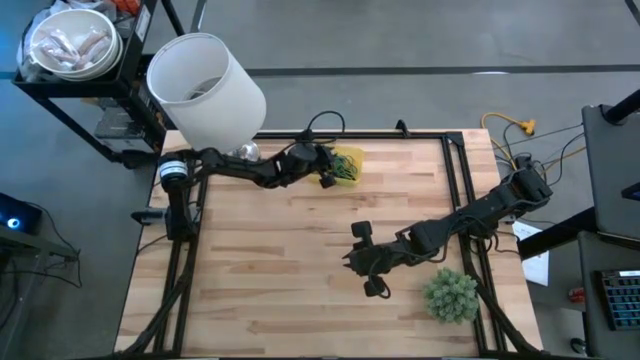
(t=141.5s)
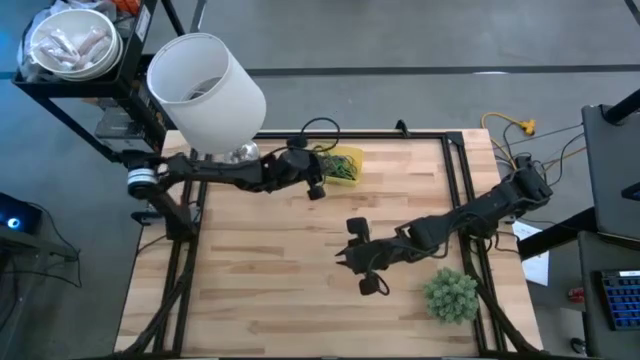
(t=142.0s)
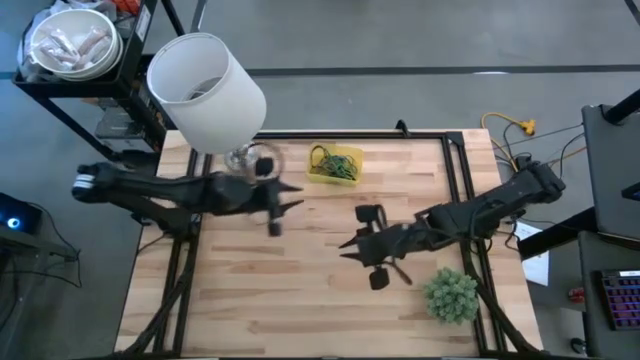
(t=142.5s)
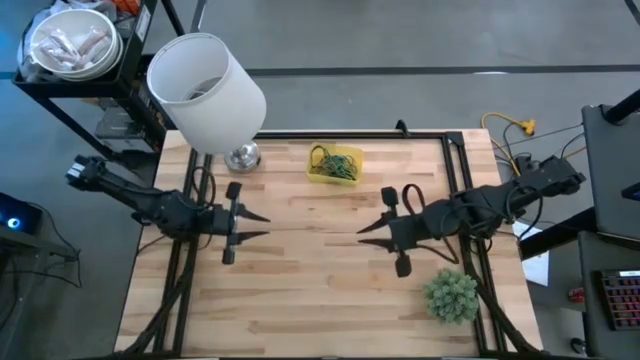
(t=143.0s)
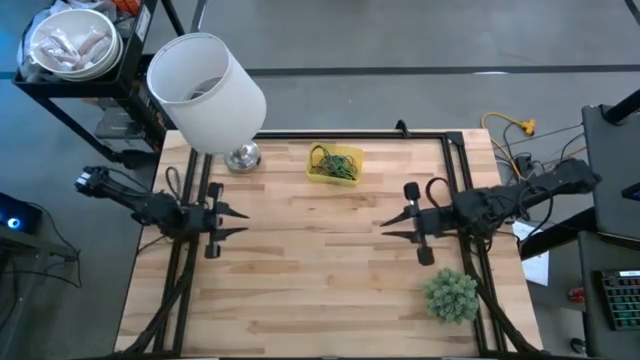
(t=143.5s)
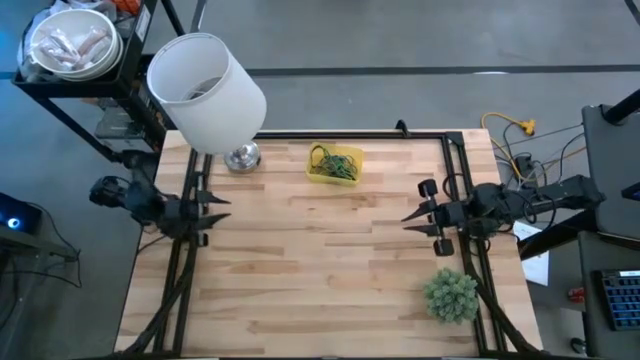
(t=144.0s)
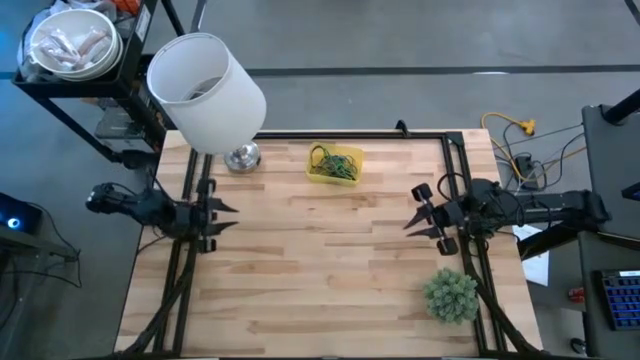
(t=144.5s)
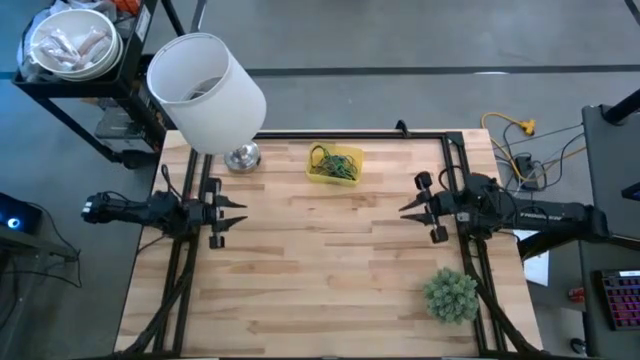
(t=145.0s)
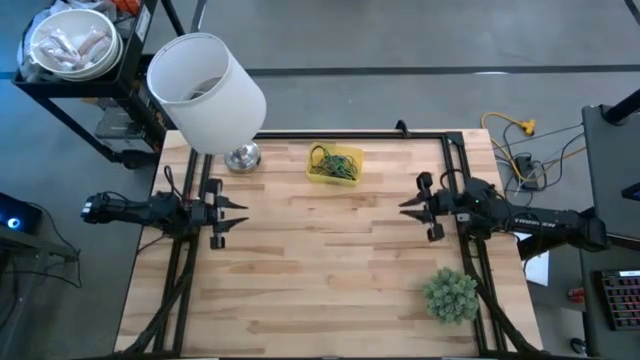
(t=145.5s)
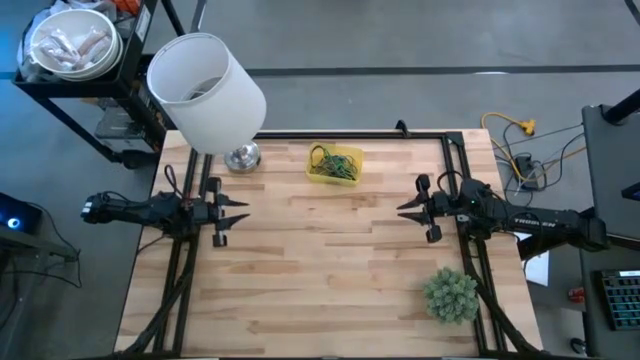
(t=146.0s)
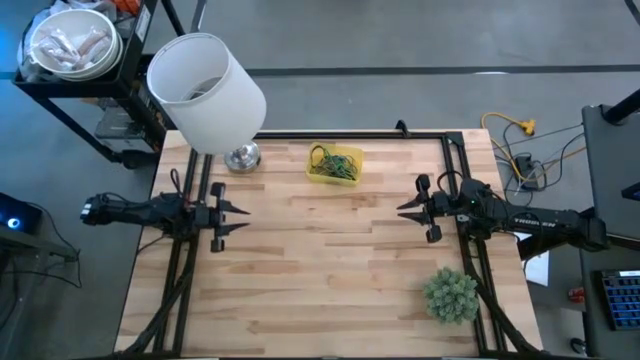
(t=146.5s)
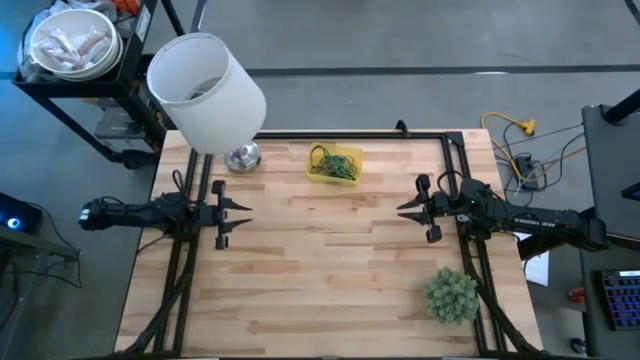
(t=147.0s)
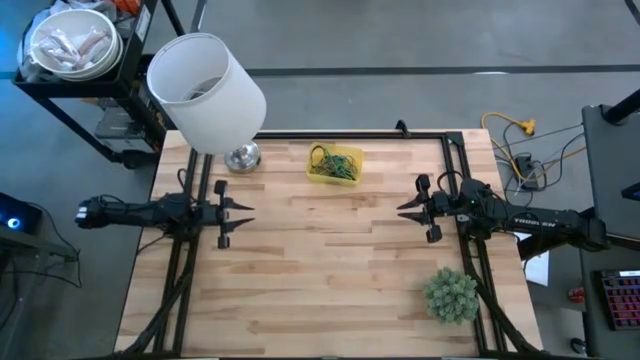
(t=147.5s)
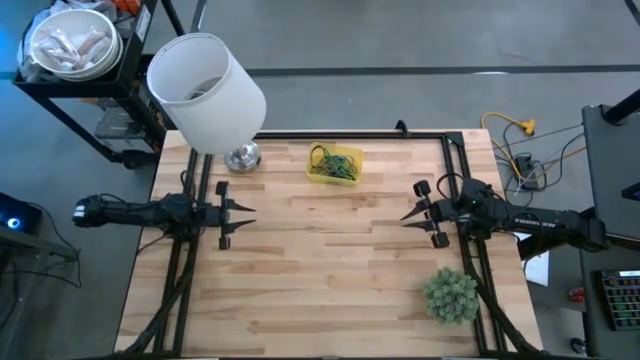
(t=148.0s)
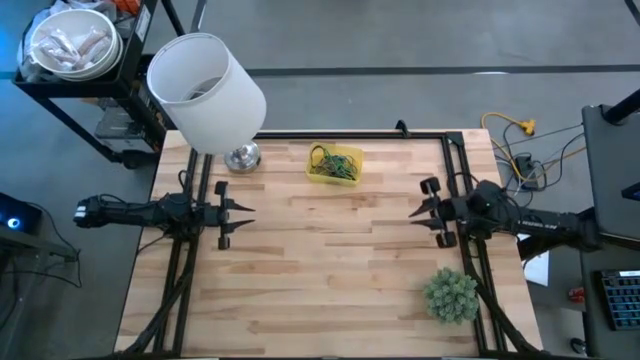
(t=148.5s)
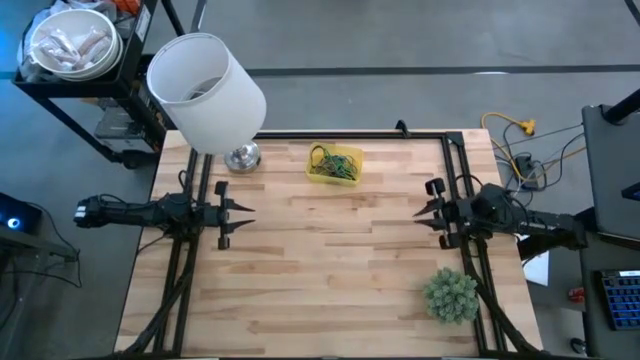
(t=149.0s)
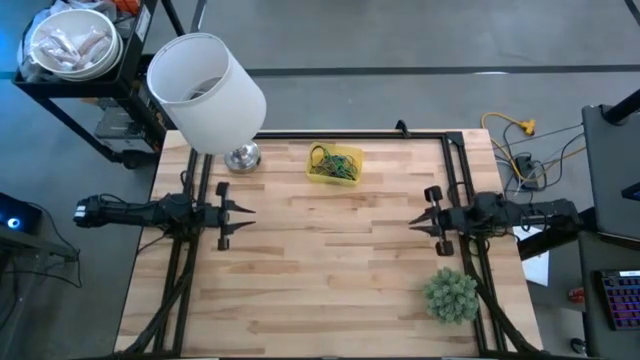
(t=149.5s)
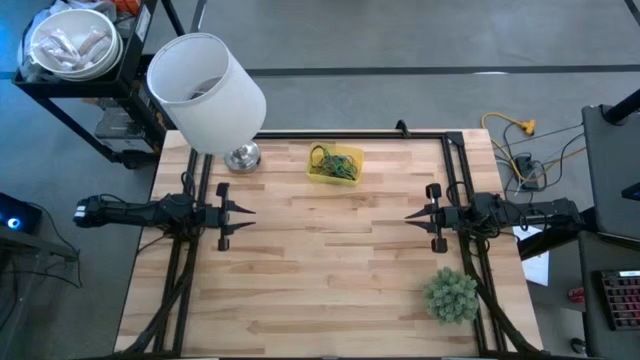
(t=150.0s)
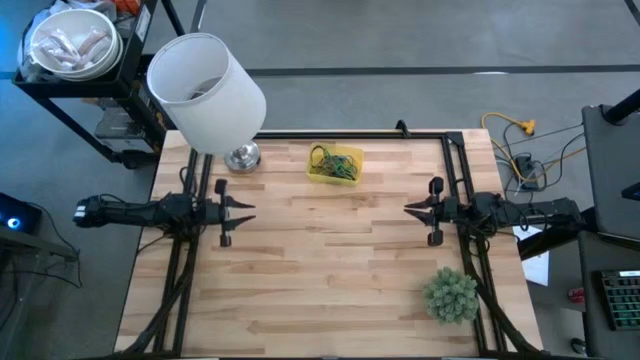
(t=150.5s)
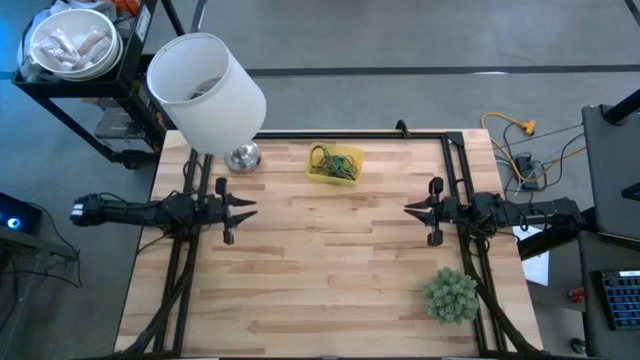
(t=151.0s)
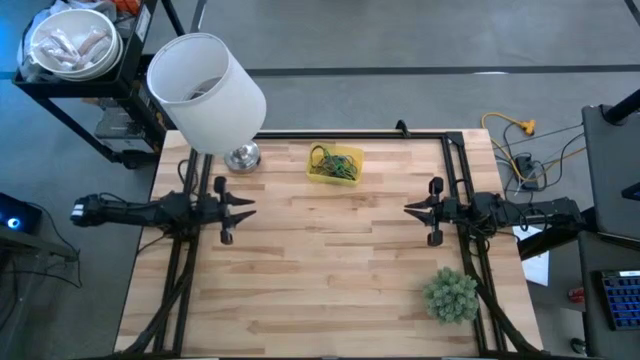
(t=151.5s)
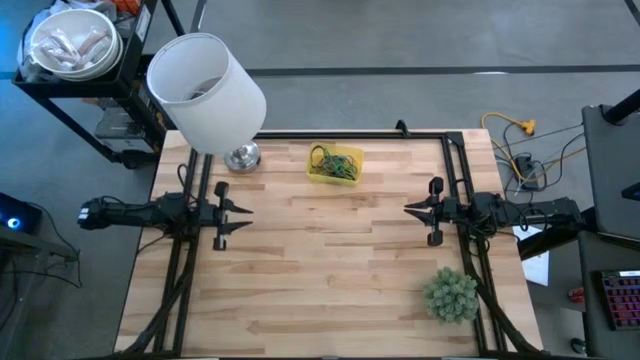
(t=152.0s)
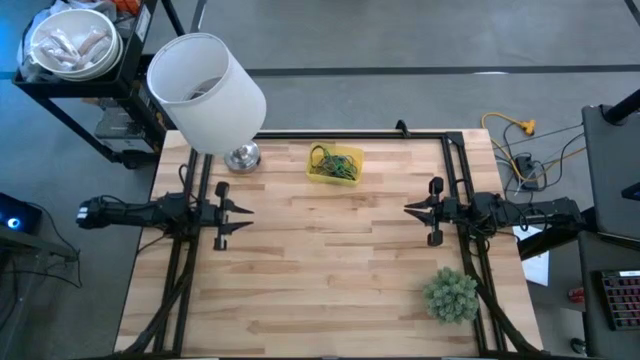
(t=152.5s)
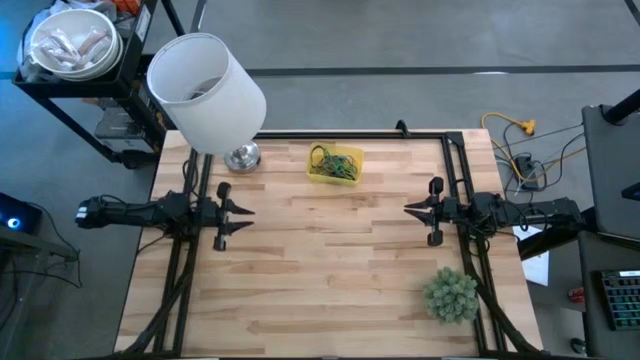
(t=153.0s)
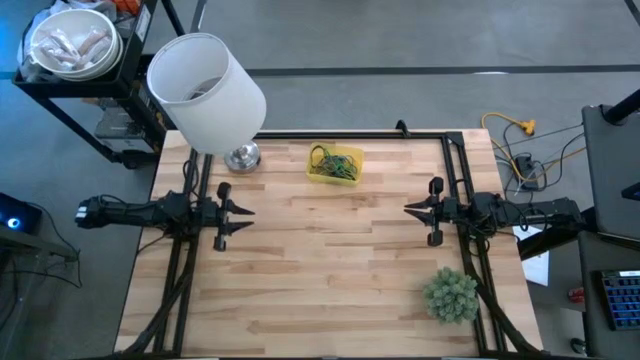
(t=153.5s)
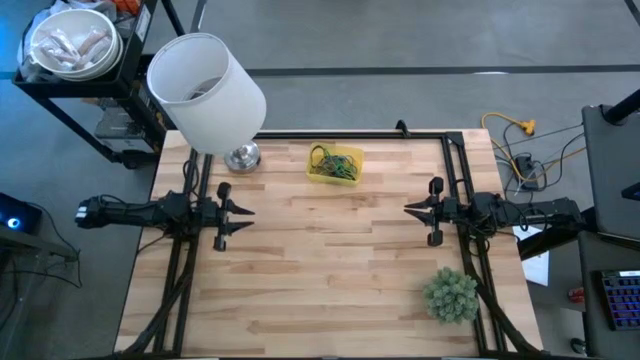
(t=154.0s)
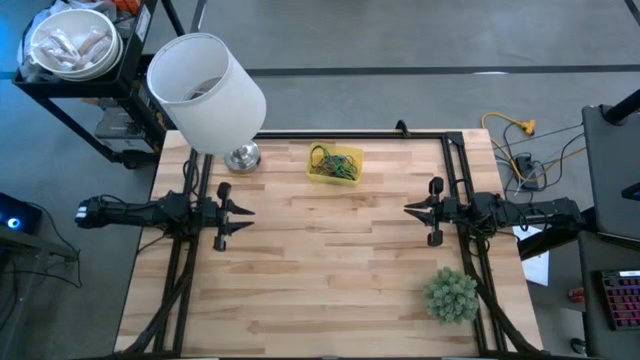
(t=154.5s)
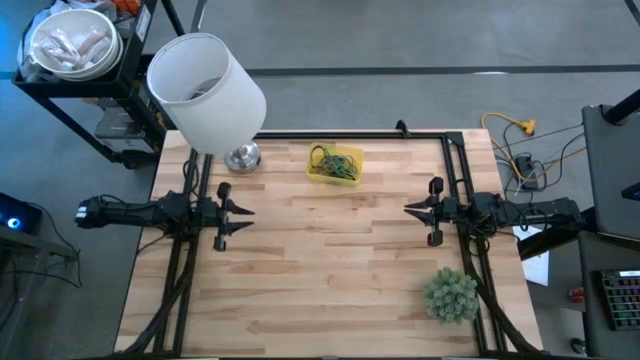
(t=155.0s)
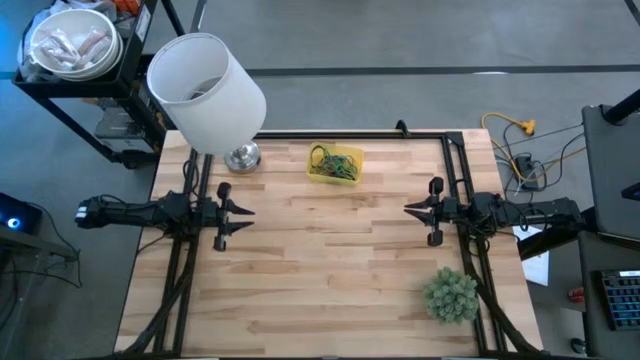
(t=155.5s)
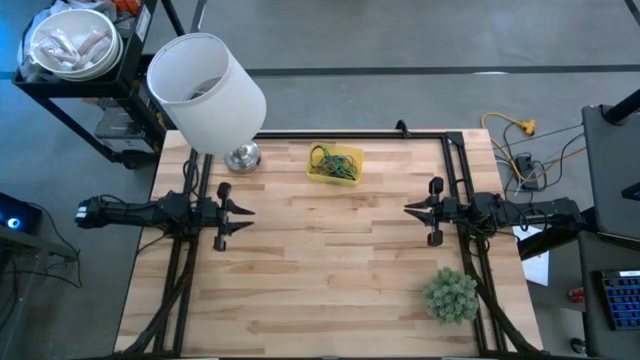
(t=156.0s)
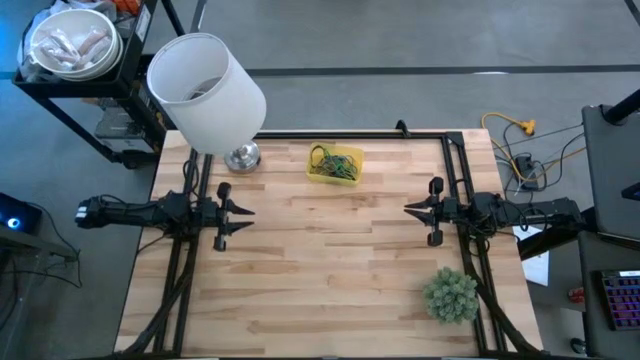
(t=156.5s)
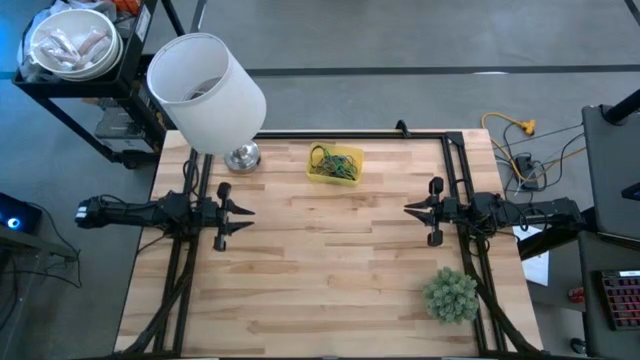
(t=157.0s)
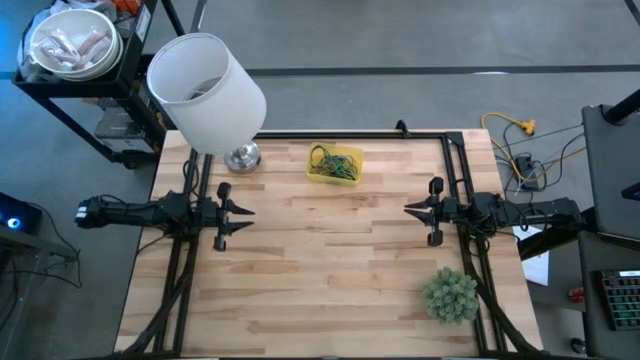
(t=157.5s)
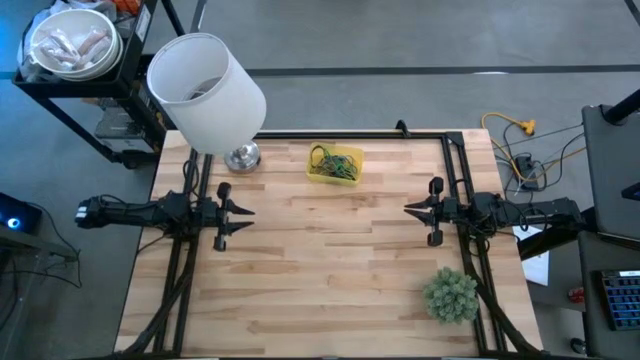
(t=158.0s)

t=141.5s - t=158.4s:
Task: Pick and place rubber bands into bin
Return to Home Position

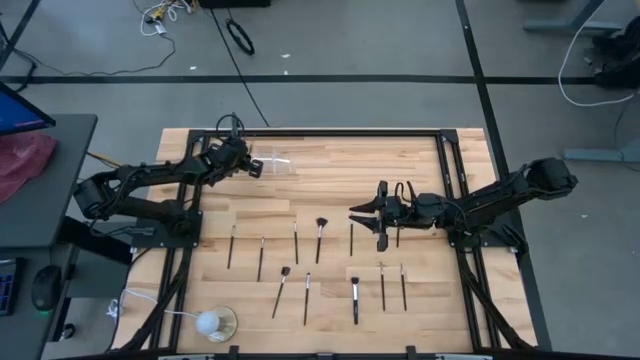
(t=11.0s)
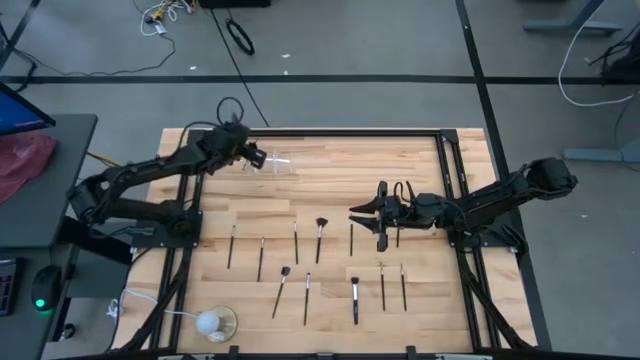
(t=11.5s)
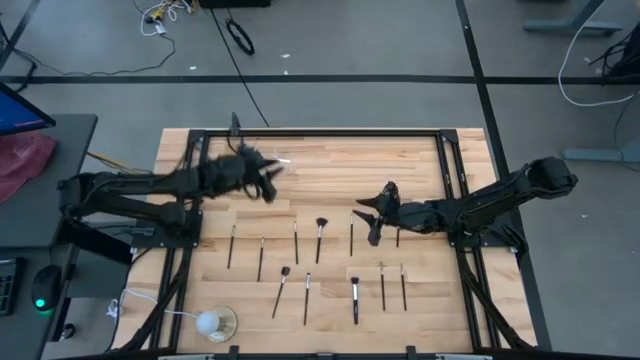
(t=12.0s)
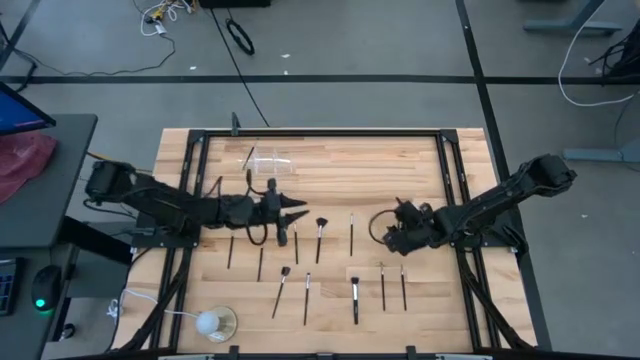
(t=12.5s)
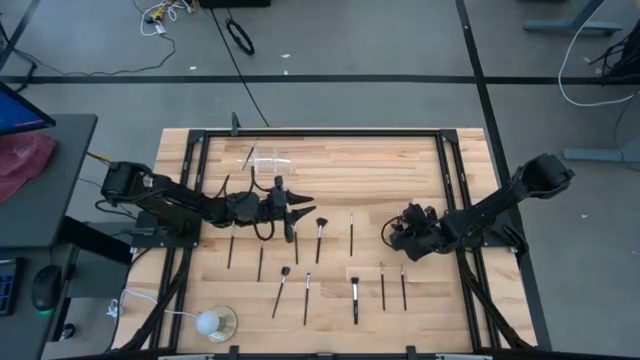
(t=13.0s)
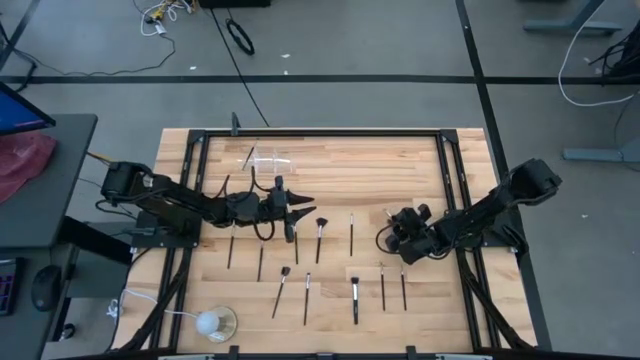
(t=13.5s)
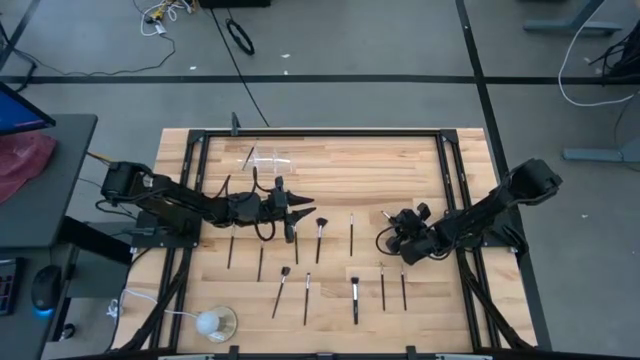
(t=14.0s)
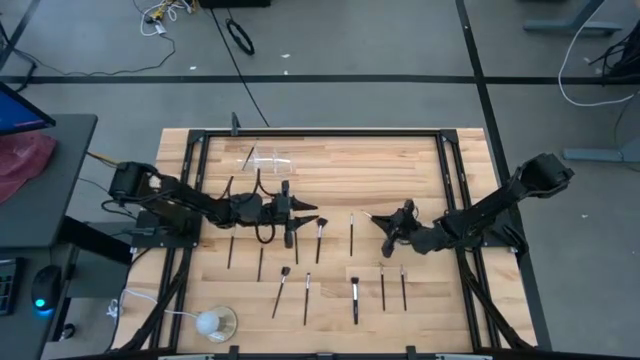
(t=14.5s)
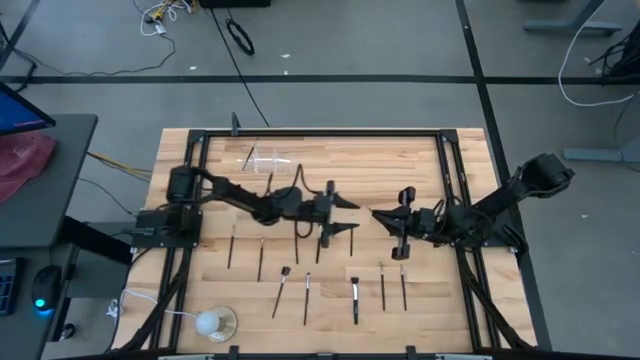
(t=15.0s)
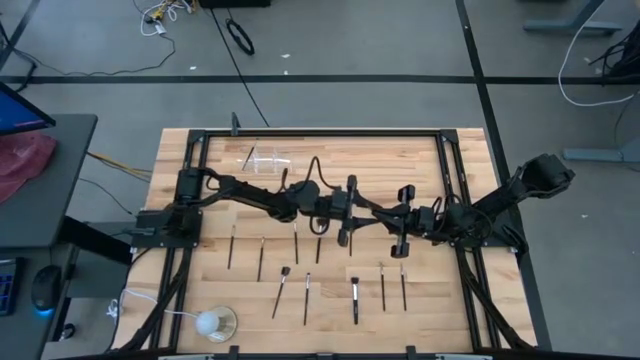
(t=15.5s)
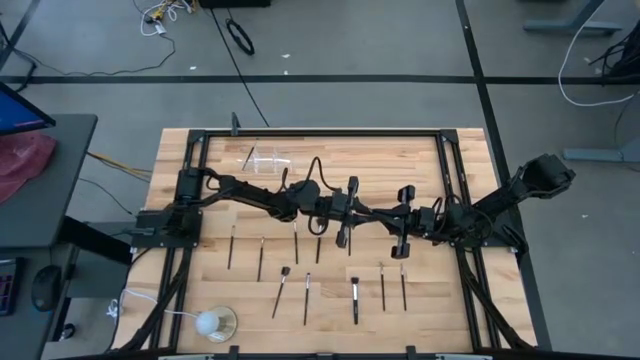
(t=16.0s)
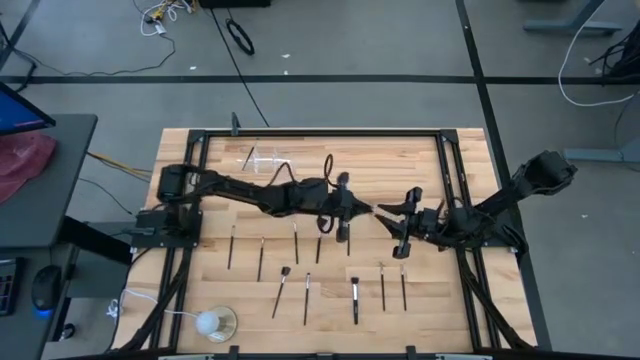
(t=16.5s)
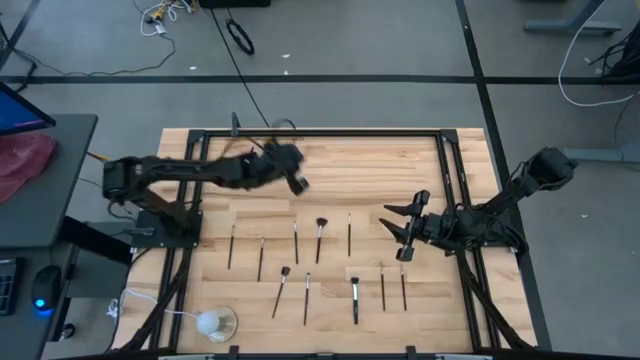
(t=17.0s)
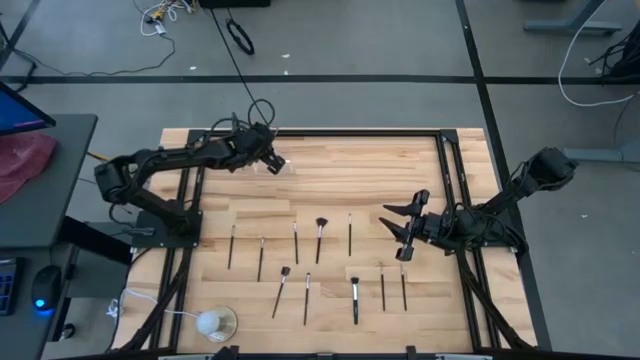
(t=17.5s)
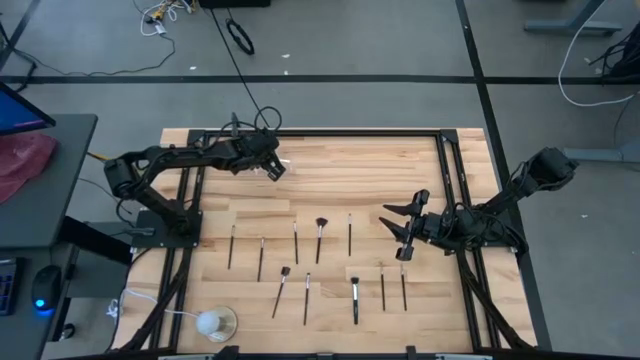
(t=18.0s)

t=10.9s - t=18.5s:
Task: Put items in baskets/containers
Put the eyeshadow brush into the middle section of the transparent organizer
